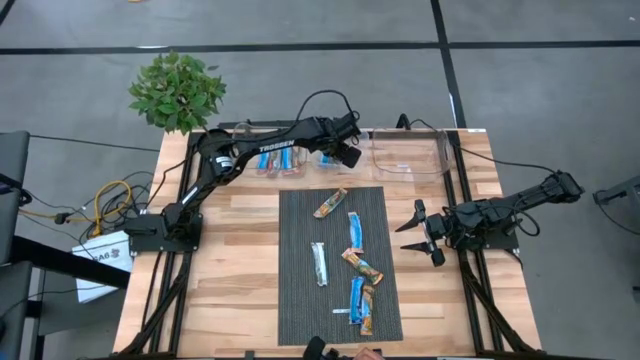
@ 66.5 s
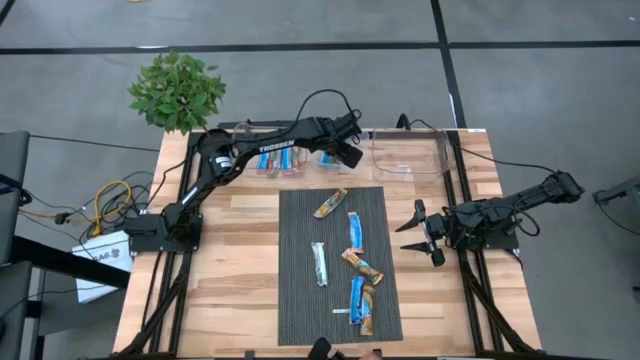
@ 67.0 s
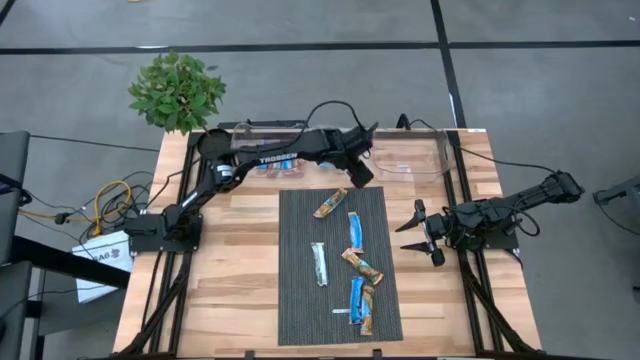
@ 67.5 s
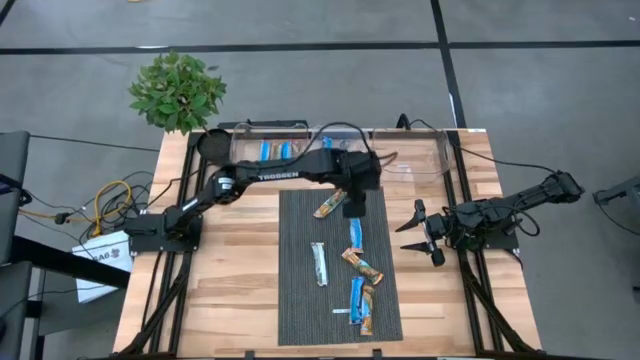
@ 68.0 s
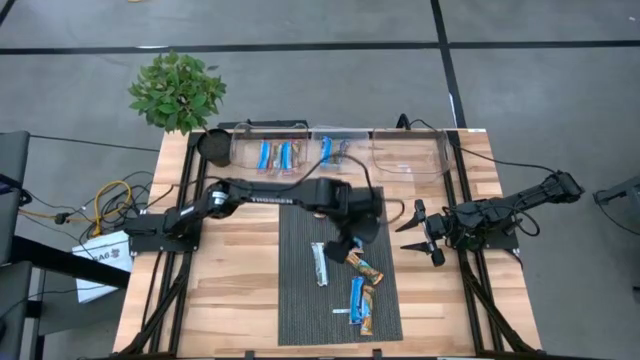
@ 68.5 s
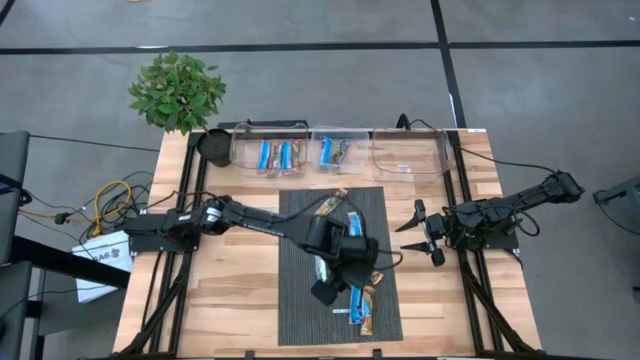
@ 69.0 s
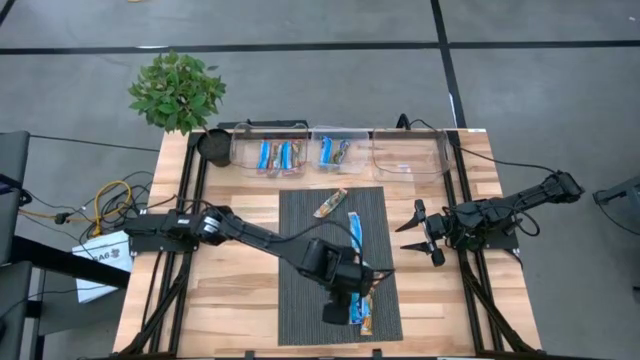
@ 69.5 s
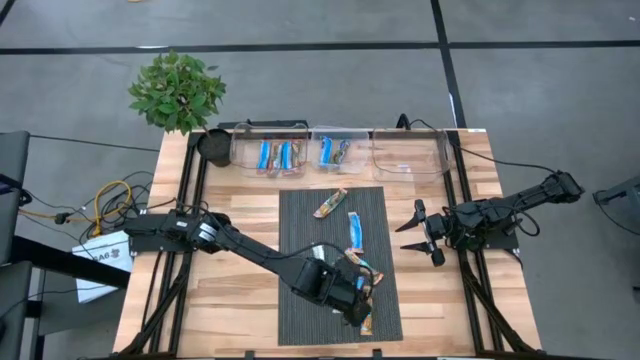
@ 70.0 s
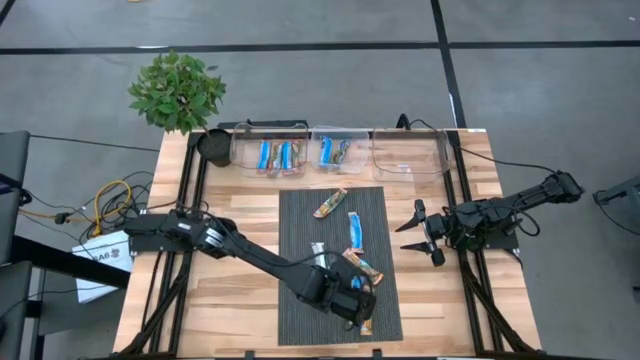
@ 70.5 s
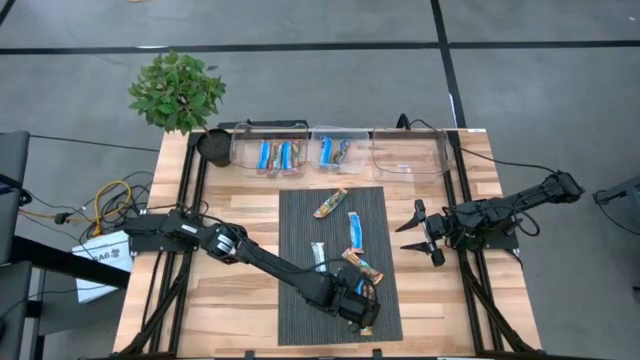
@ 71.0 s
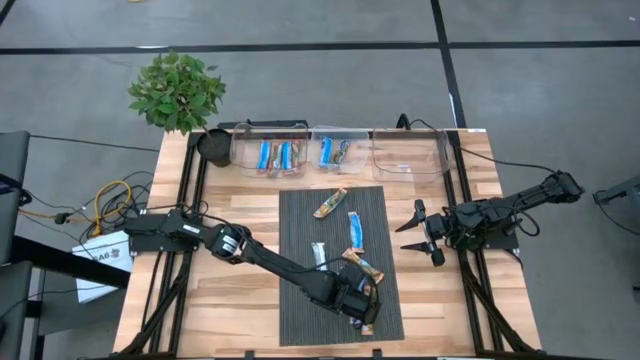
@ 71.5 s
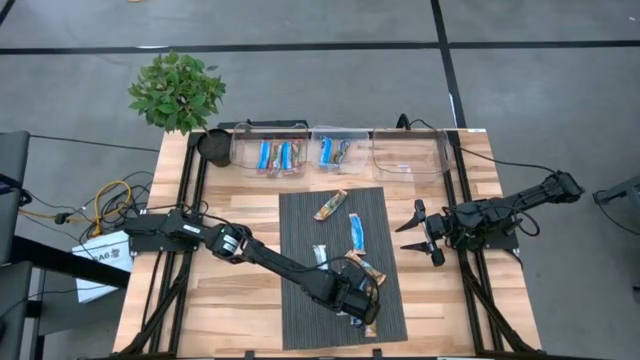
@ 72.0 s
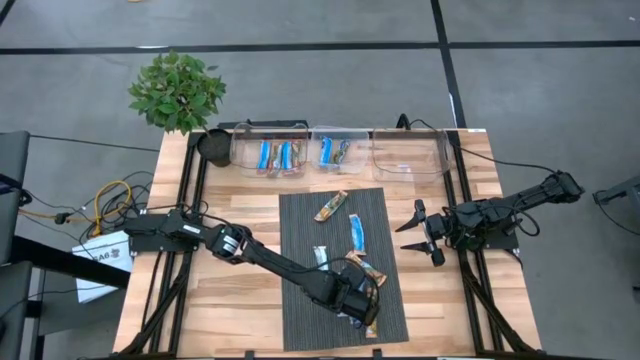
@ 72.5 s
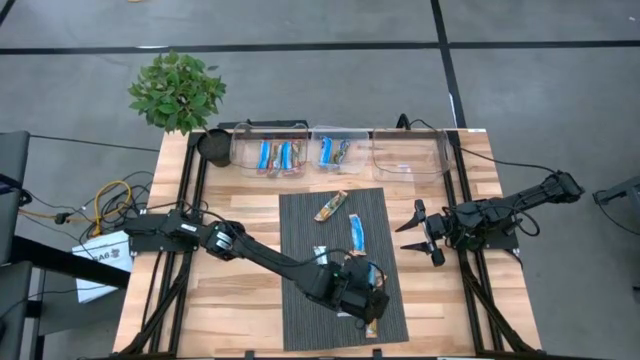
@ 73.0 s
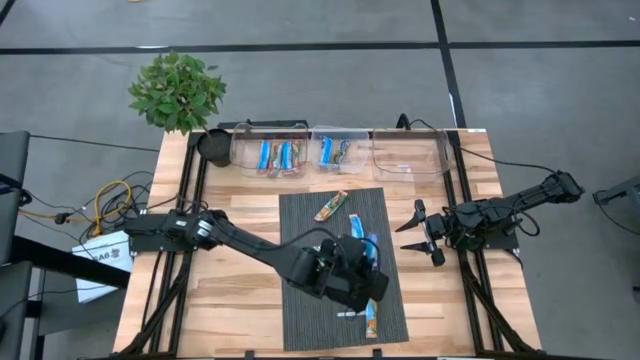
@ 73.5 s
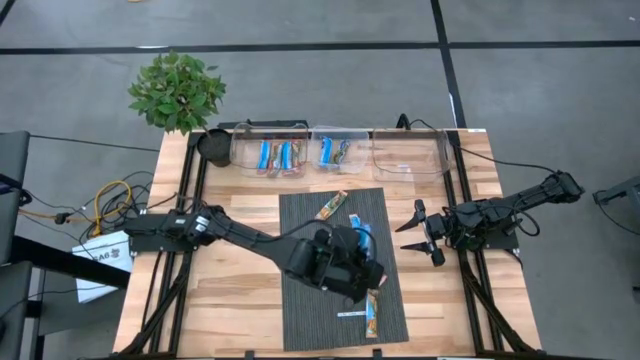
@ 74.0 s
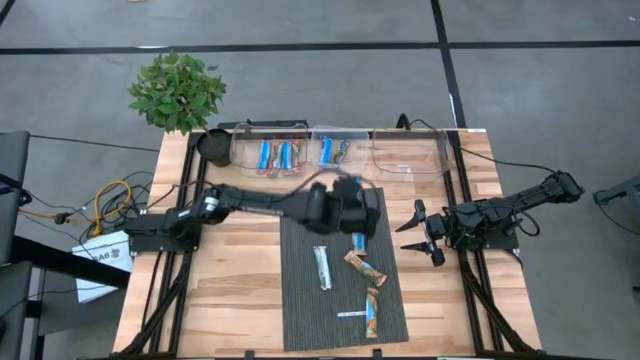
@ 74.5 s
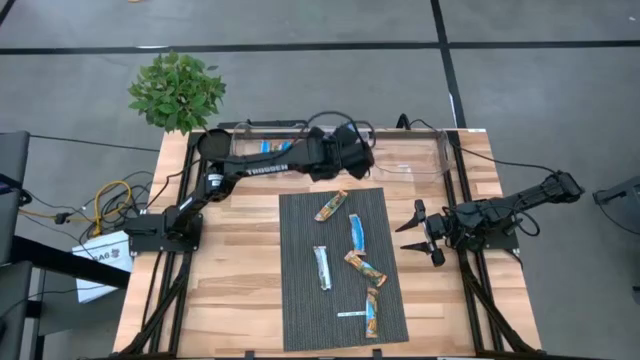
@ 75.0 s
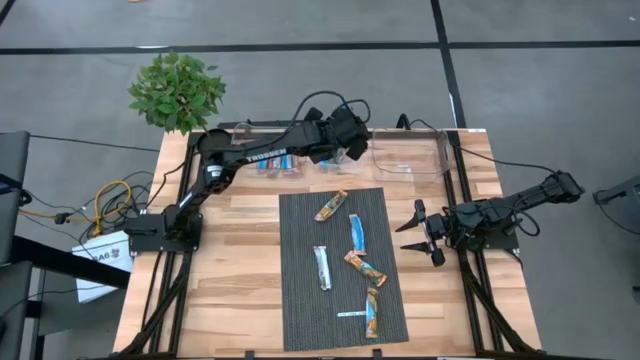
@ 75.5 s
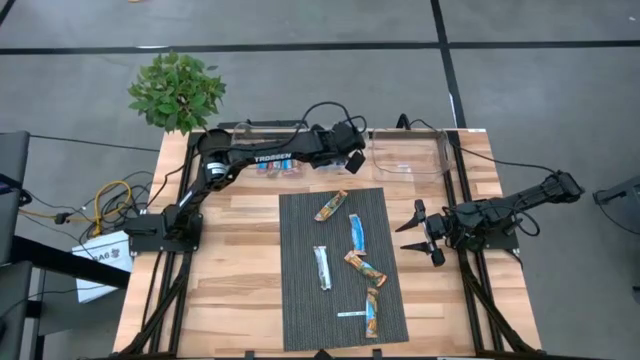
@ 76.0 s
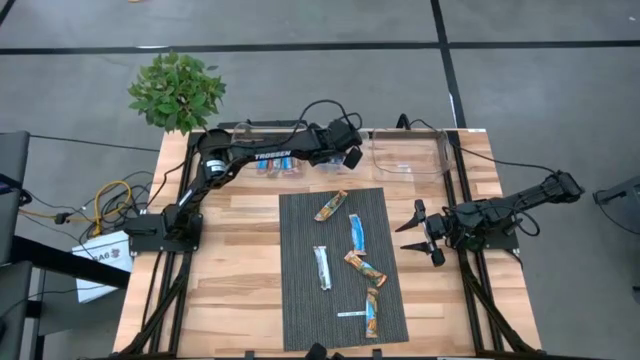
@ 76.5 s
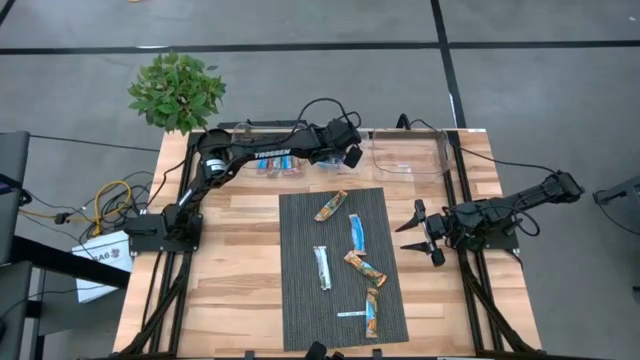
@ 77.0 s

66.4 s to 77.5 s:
Task: Pick and place Granola Bars by type
Put the blue granola bar into the middle transparent bin

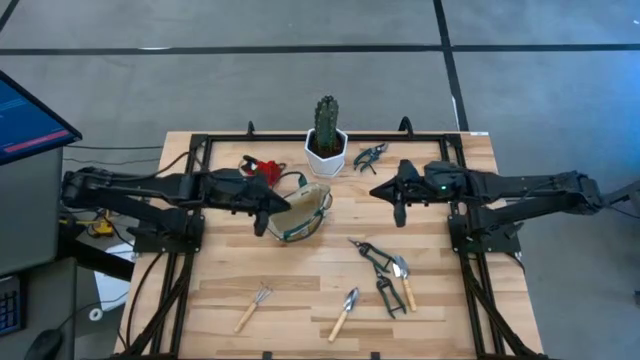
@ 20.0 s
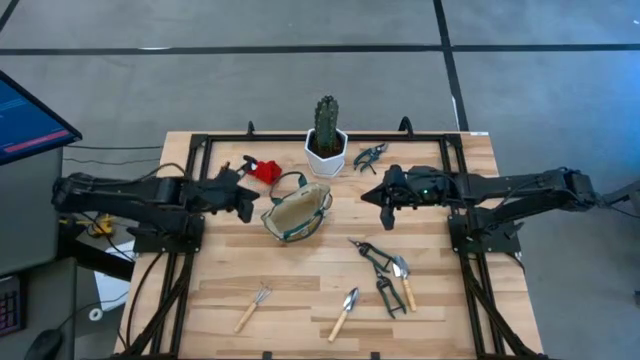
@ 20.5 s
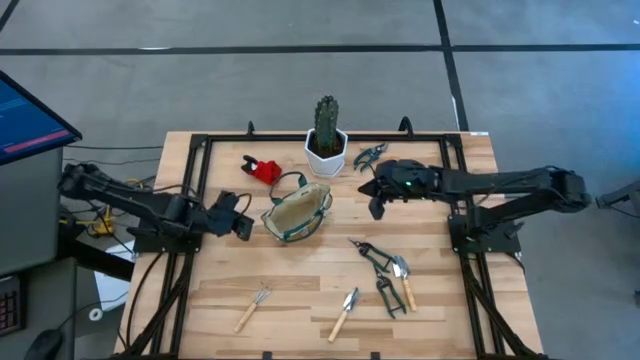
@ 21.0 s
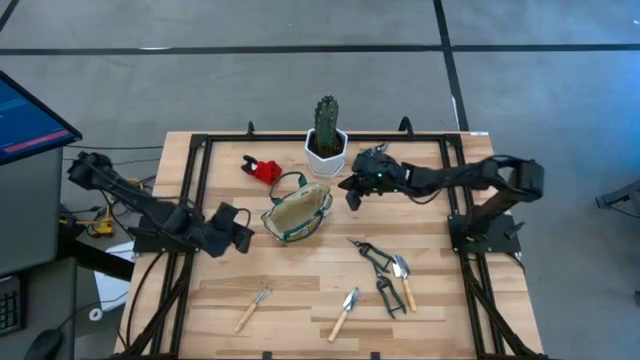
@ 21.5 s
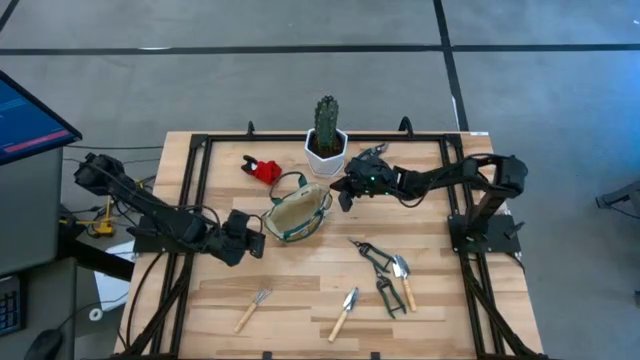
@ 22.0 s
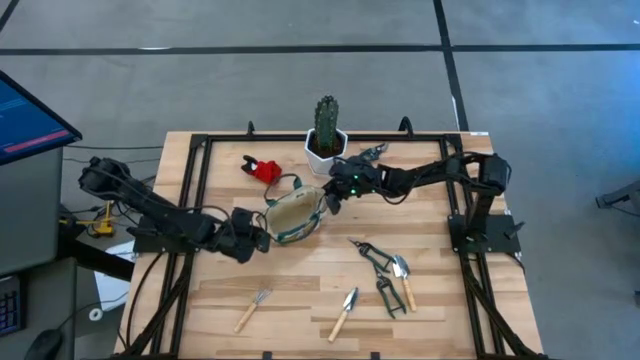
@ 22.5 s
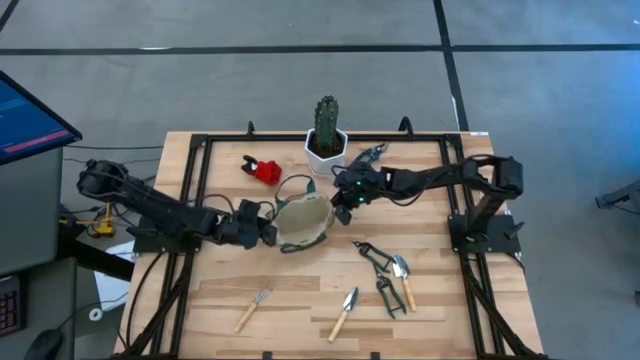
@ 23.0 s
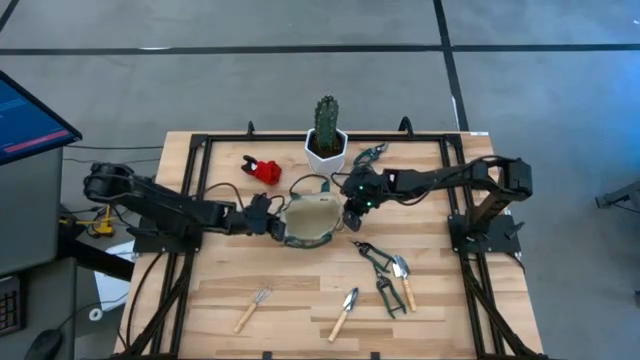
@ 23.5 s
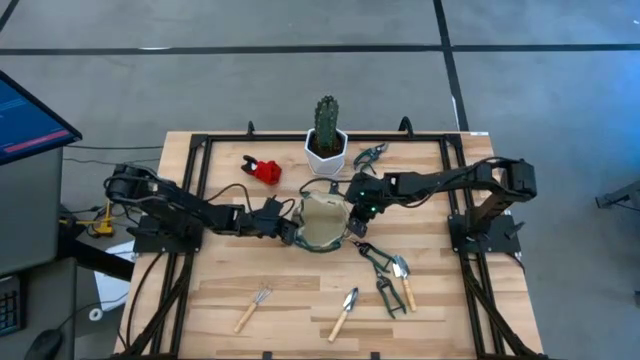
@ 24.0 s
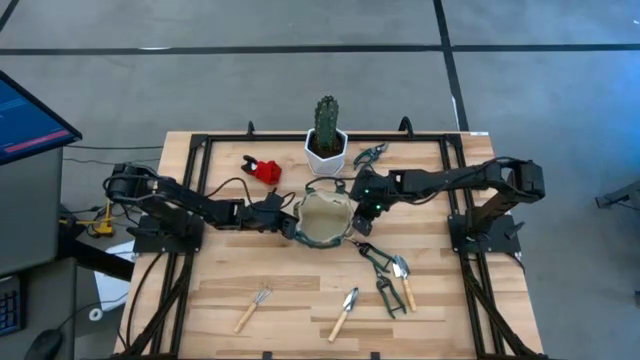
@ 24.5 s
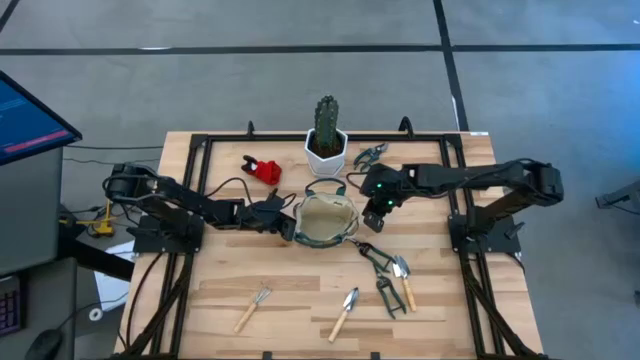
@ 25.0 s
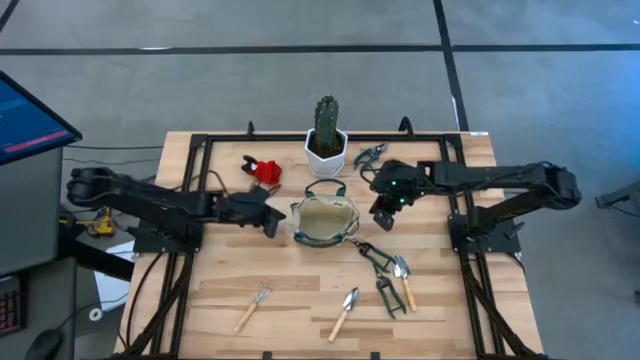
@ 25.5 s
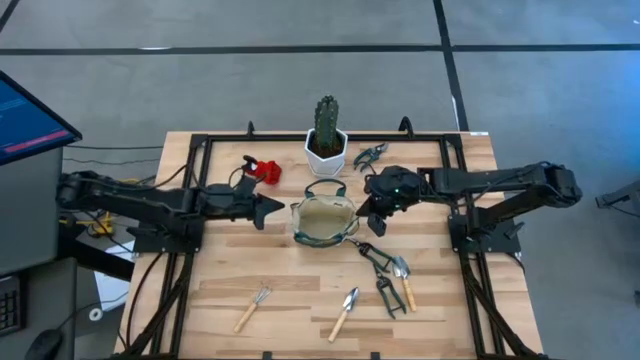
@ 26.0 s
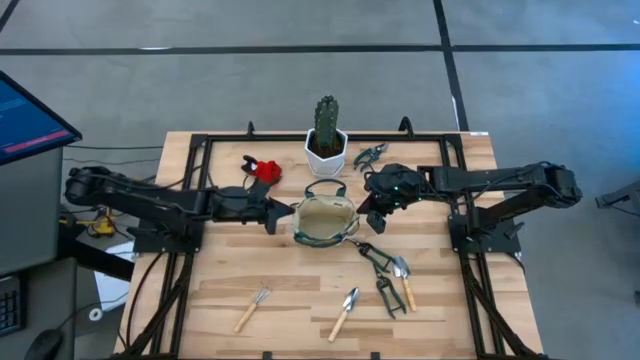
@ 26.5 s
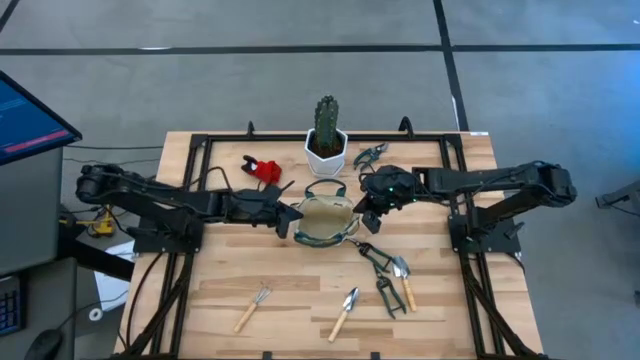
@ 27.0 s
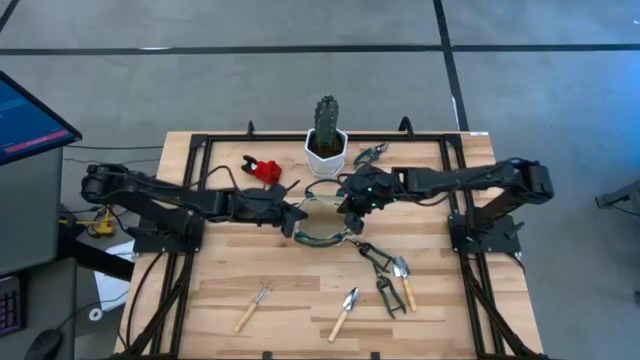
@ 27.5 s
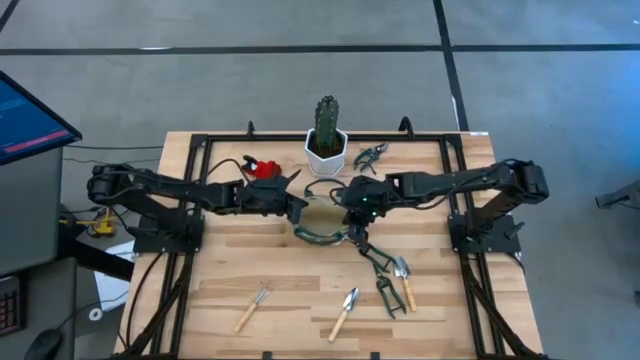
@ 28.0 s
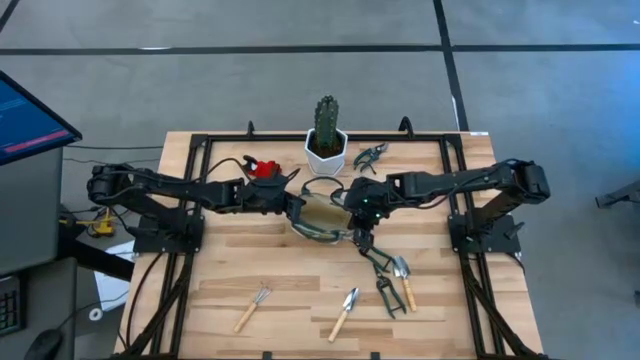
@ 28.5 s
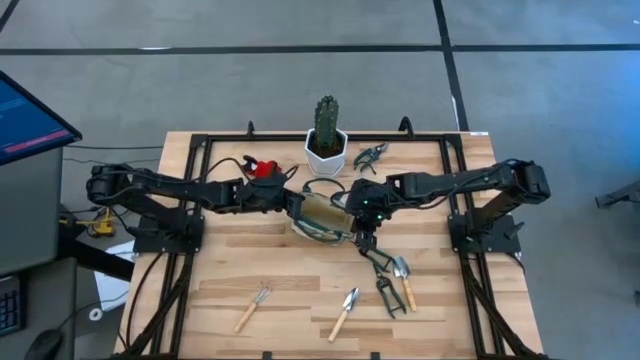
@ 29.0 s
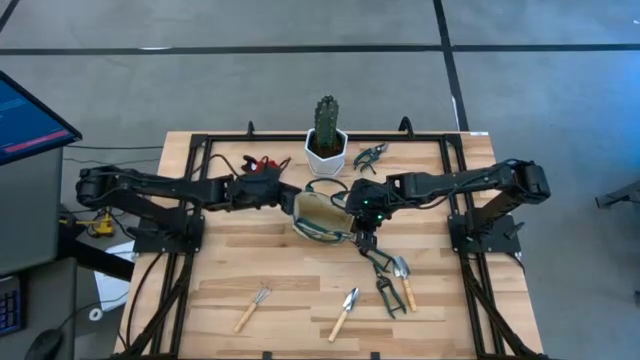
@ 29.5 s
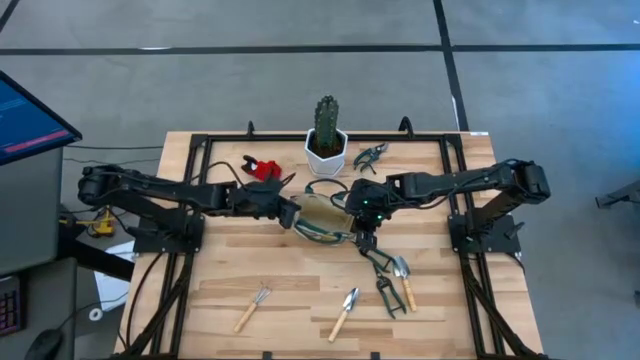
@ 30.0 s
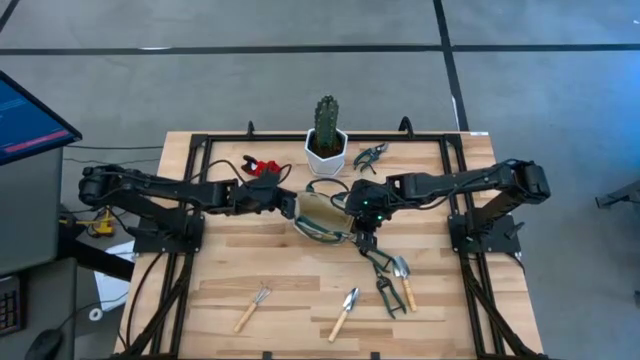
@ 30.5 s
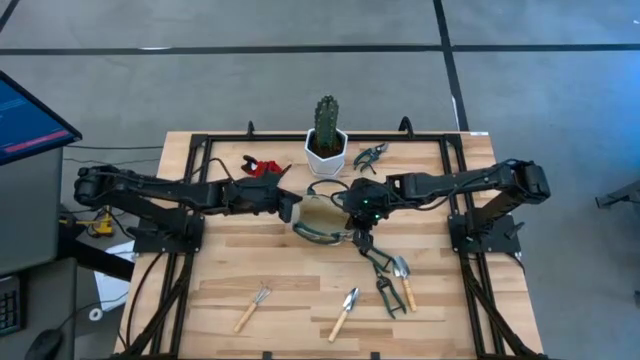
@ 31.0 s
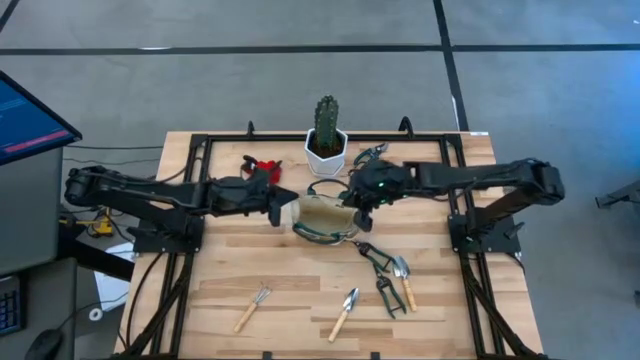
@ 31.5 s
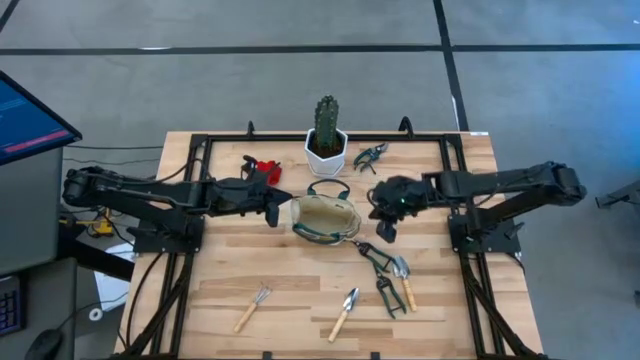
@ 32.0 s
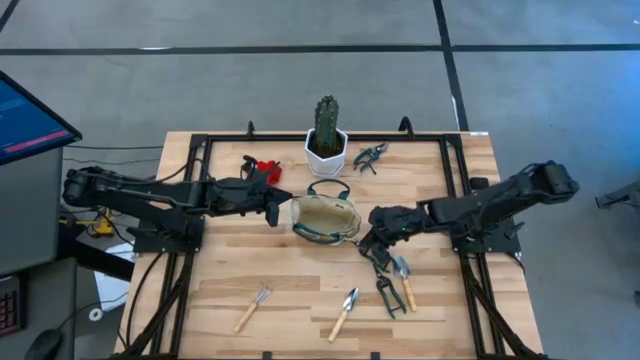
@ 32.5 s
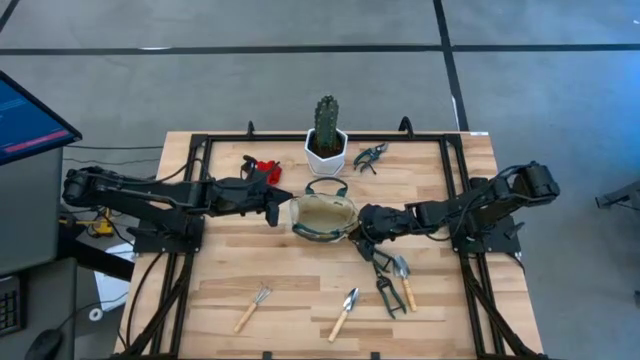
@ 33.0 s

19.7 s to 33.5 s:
Task: Pick & Place Garden tools in Gardening bag
Prepare the gardening bag
